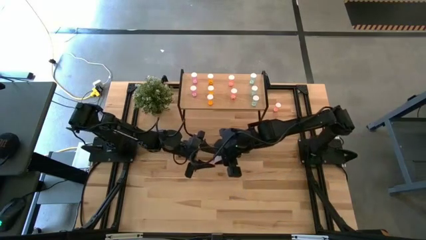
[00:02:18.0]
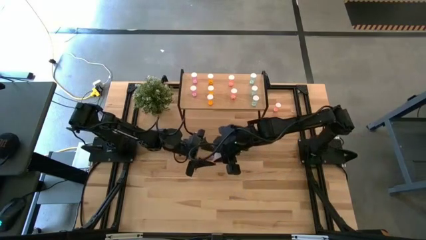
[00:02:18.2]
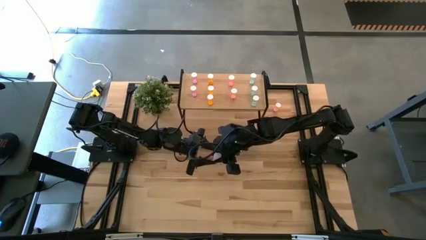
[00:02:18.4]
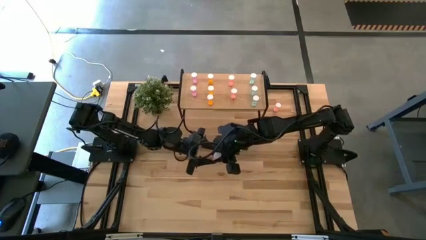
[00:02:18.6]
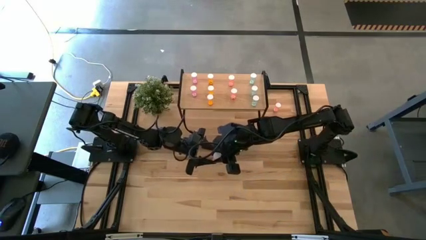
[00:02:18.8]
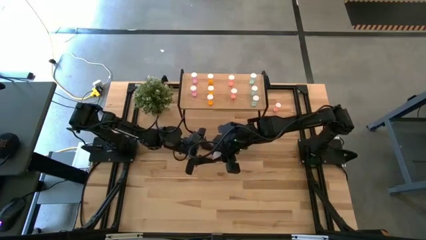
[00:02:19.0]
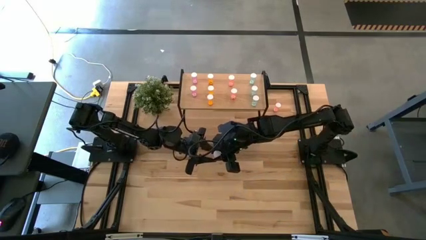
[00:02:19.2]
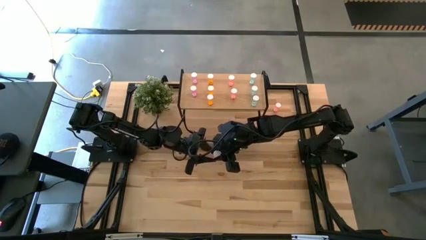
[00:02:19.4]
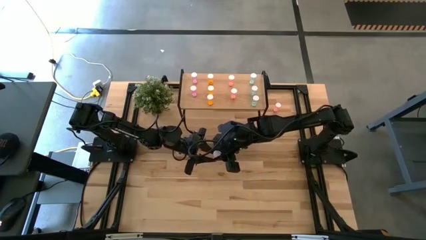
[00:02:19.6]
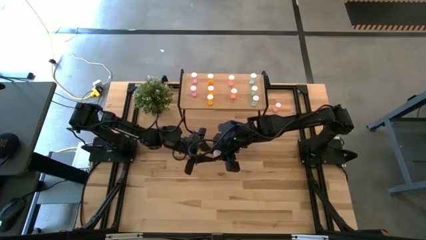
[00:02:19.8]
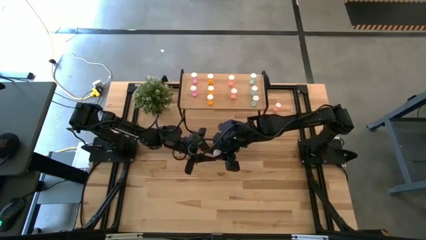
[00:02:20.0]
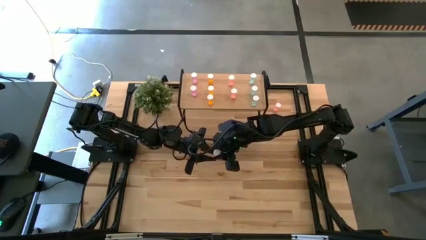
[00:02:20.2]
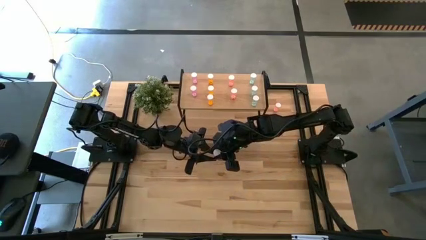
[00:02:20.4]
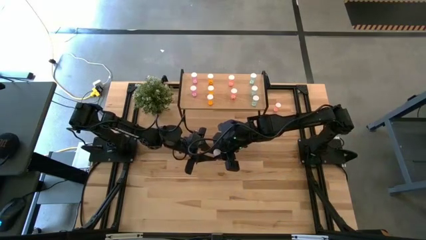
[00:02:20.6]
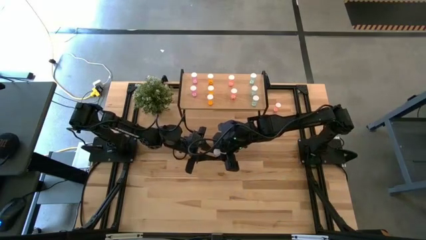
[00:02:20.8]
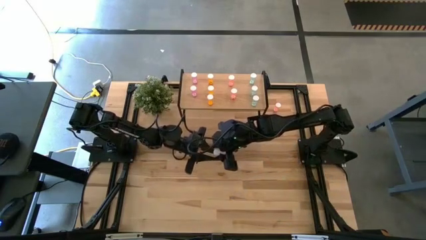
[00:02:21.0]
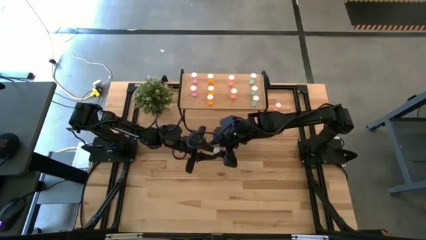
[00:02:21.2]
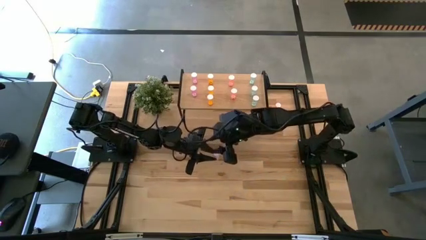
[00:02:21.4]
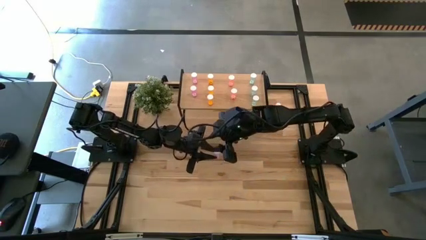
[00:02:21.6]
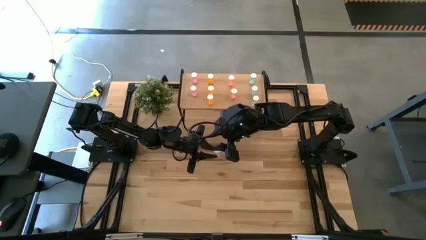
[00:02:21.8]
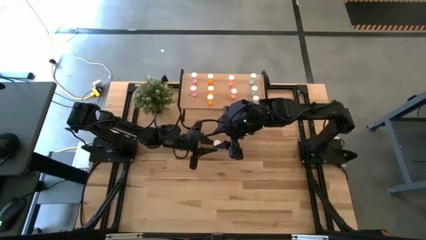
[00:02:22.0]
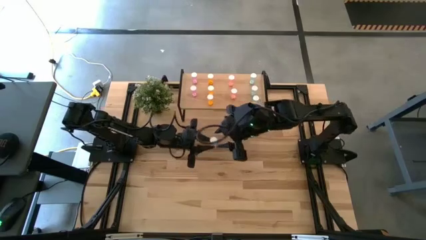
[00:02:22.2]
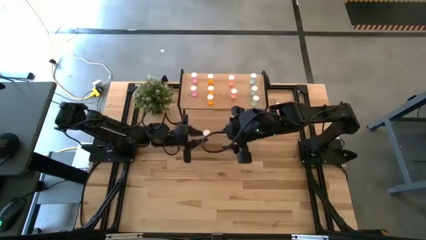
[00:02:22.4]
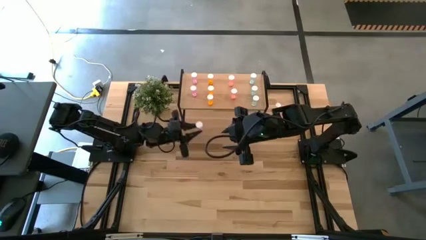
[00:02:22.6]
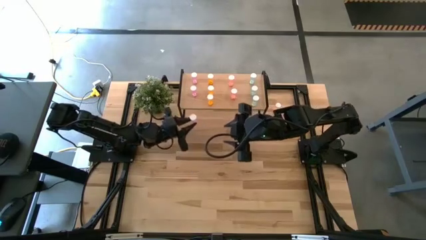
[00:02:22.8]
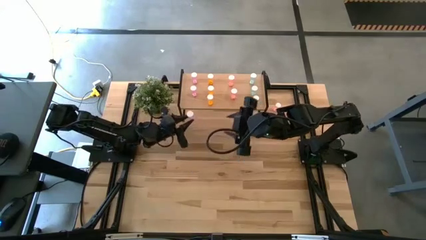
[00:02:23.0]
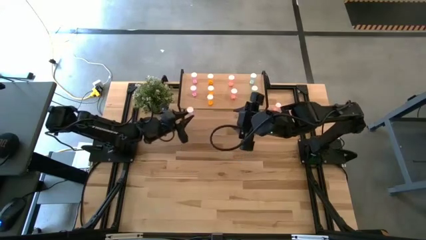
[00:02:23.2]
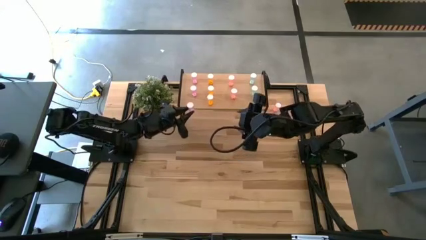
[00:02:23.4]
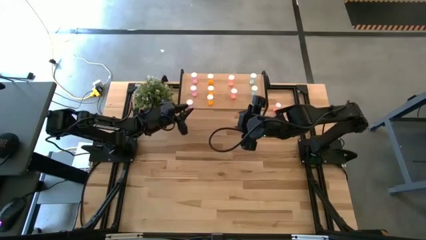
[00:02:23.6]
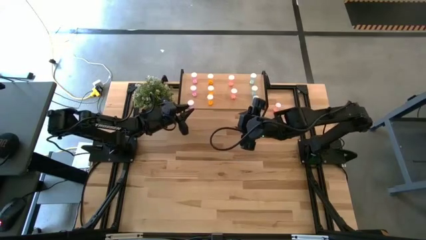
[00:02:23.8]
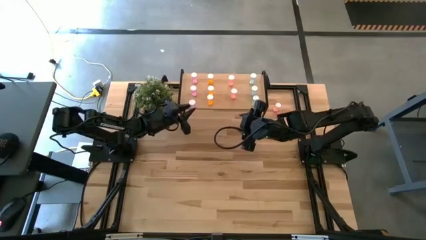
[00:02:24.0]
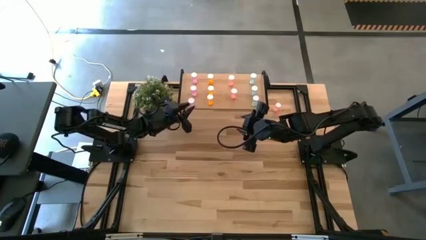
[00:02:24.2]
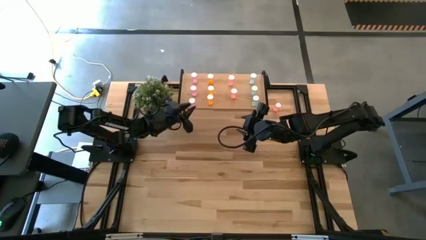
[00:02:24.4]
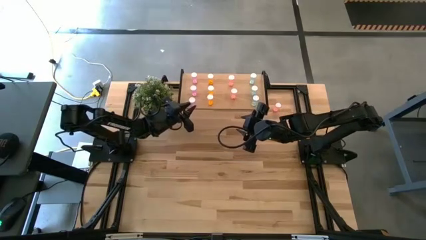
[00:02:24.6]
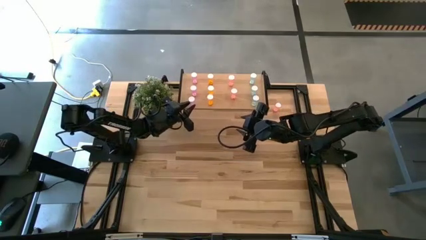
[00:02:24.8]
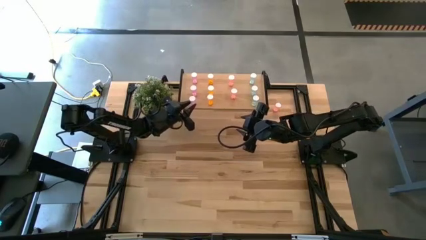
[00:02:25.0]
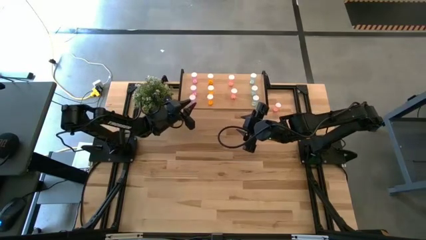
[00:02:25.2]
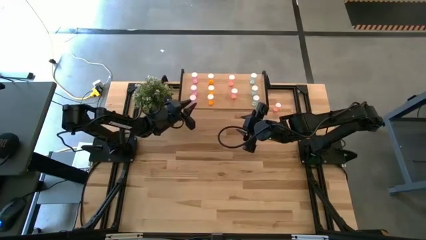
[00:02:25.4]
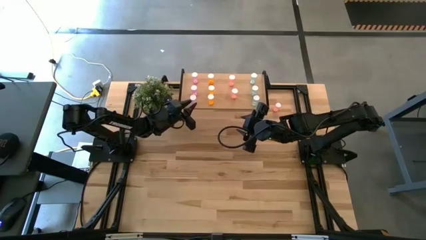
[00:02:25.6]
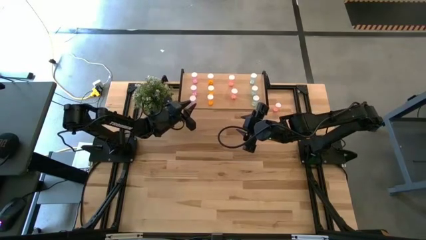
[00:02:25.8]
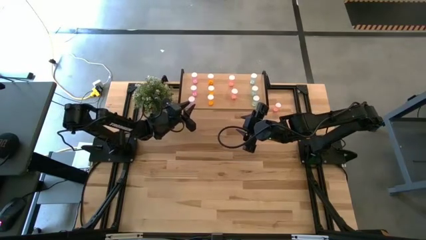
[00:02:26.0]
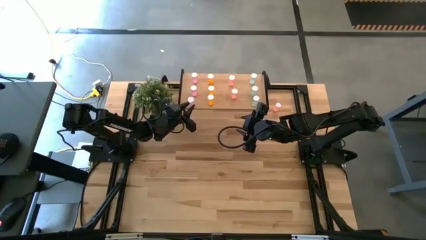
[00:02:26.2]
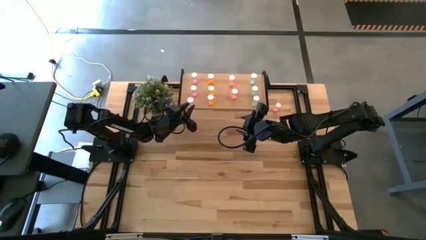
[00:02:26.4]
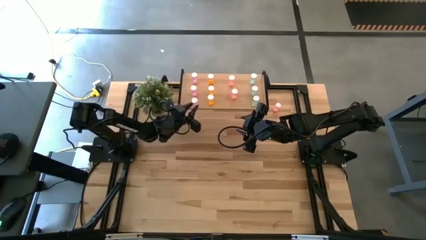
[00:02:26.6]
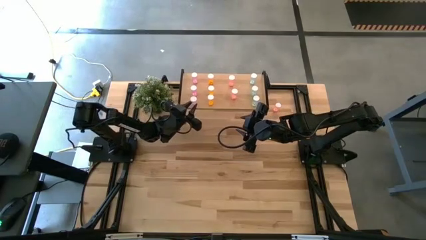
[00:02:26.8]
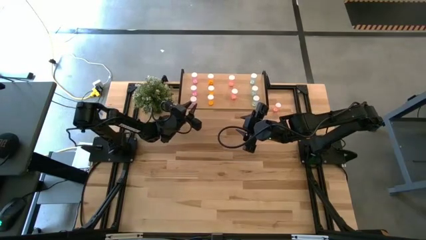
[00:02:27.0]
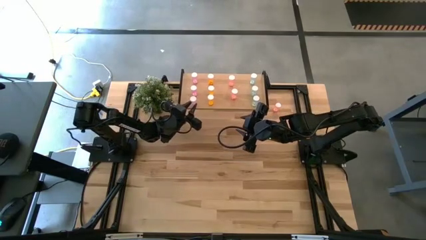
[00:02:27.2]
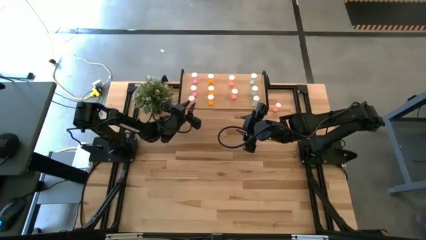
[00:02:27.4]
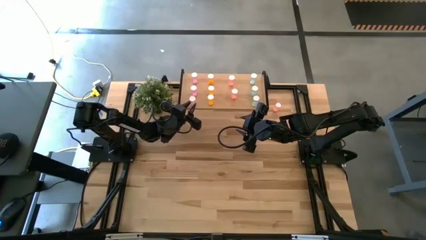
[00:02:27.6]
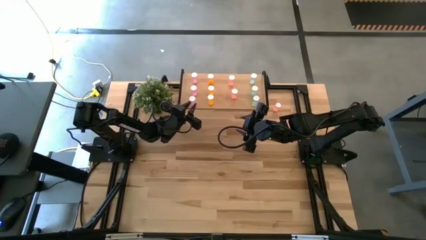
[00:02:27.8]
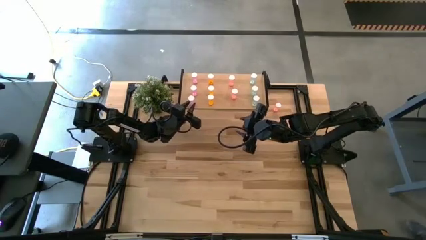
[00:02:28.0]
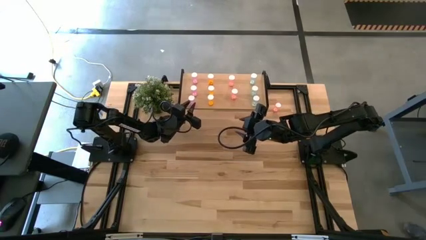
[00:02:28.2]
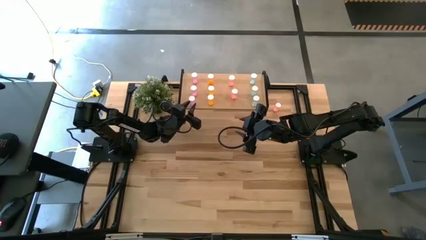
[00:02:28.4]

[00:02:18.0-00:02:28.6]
Task: Pick and place medicine bottles onto shelf by color
Put the violet pill bottle aligned with the other violet pill bottles on the shelf
